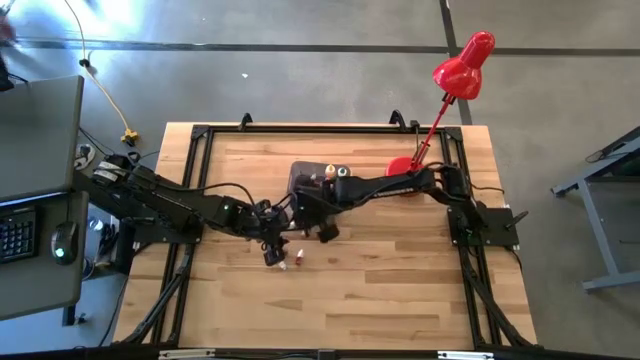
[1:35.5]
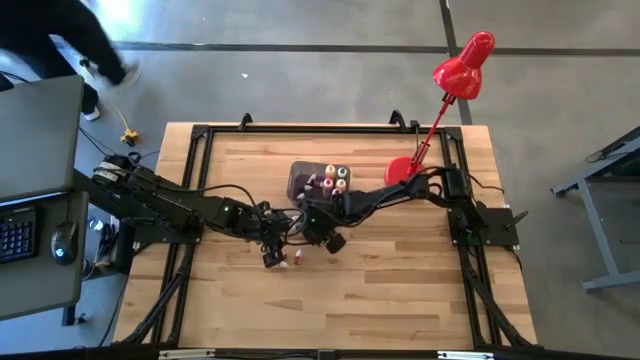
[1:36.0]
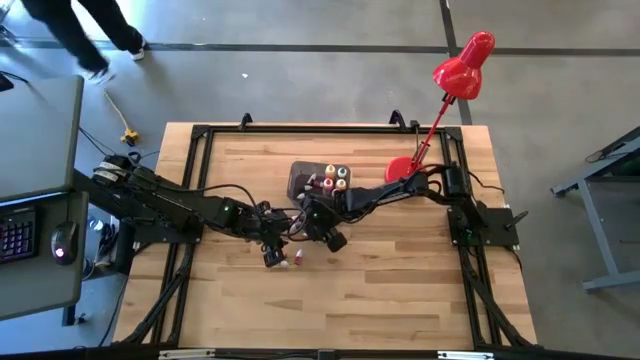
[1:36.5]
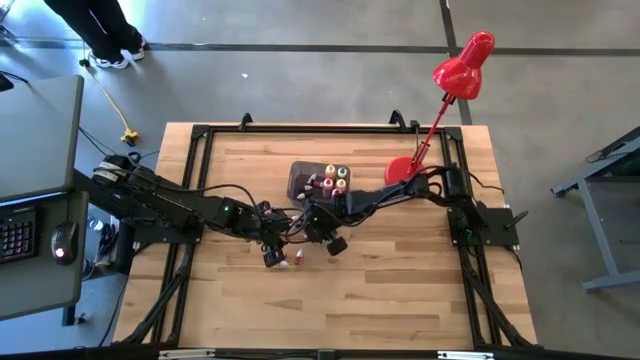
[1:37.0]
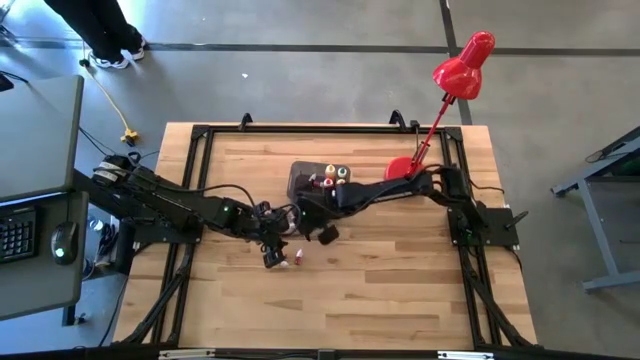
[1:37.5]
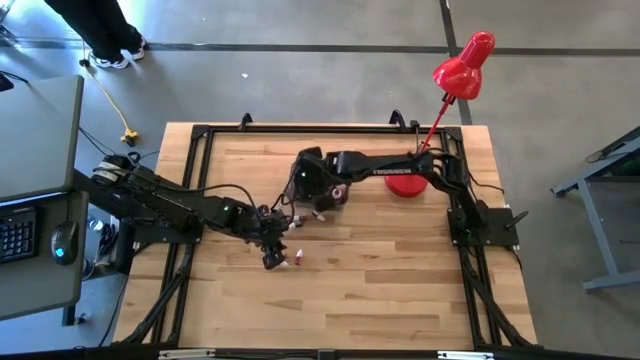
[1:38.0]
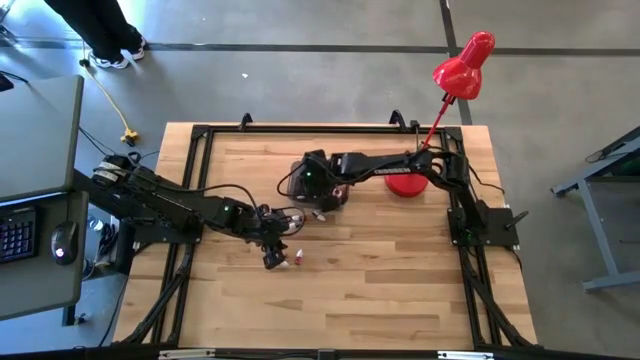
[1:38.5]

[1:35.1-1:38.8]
Task: Pick & Place food coloring
Put the small green food coloring bottle into the black bin

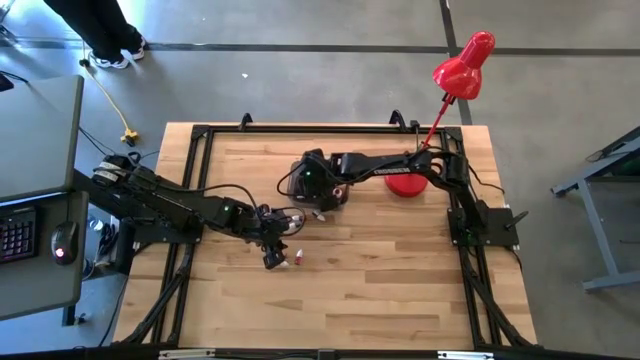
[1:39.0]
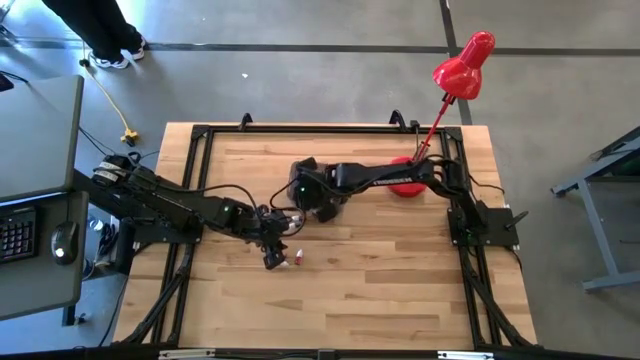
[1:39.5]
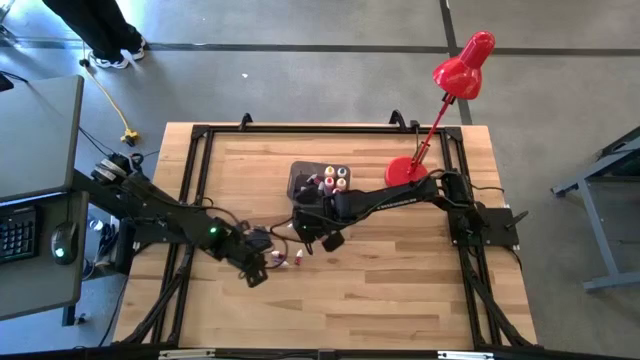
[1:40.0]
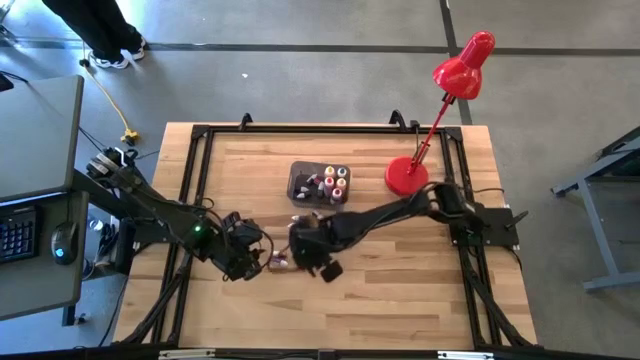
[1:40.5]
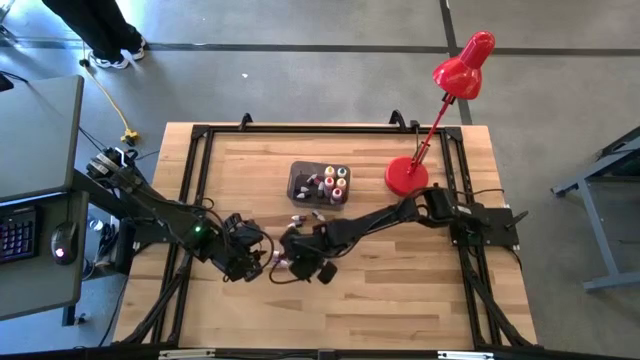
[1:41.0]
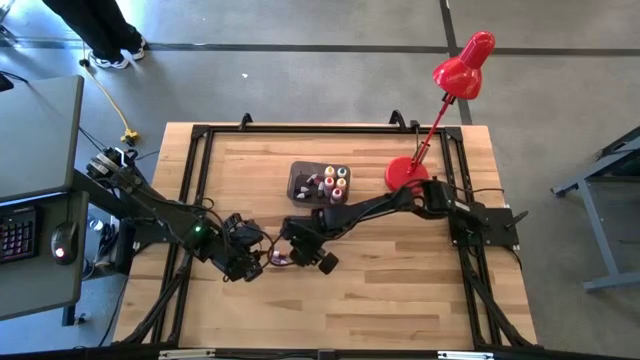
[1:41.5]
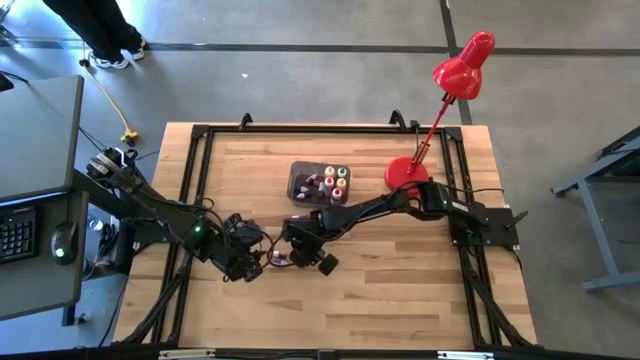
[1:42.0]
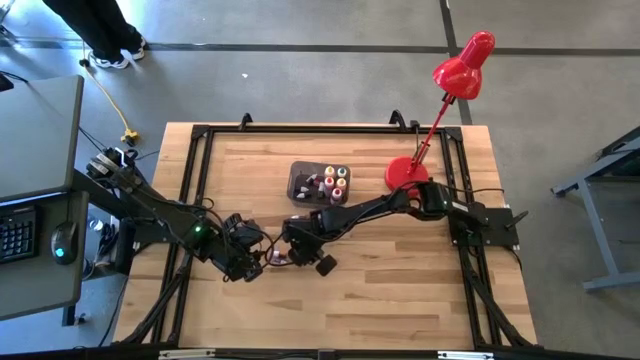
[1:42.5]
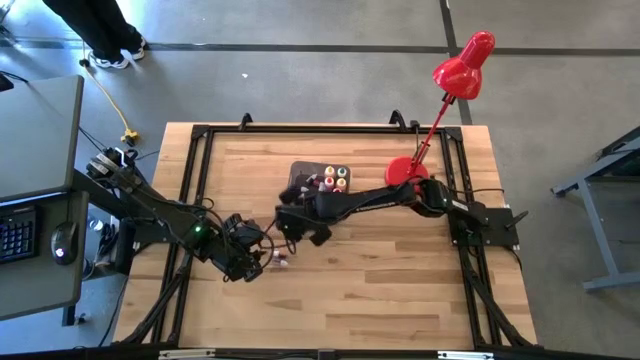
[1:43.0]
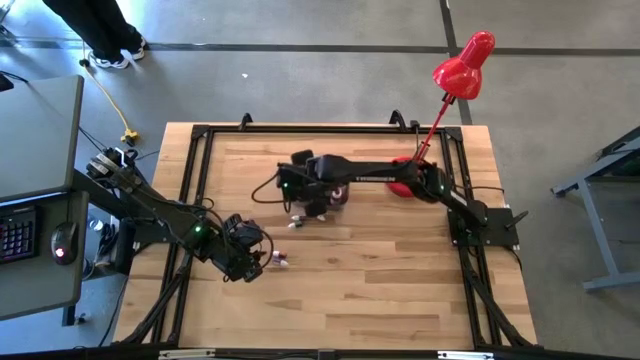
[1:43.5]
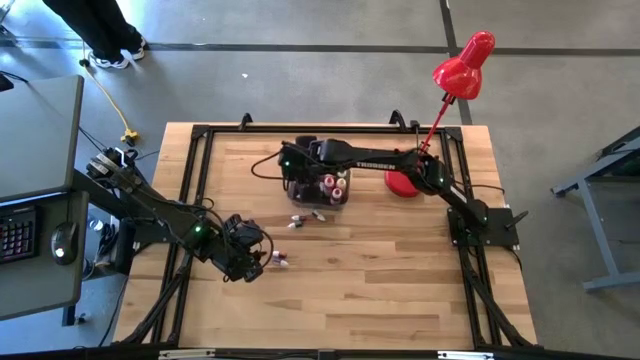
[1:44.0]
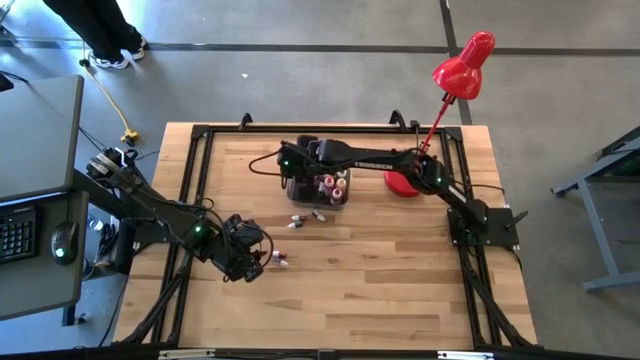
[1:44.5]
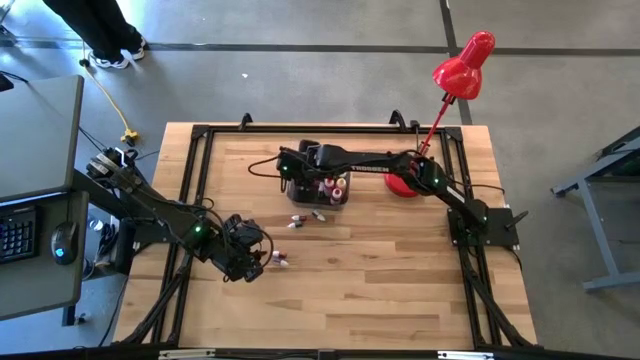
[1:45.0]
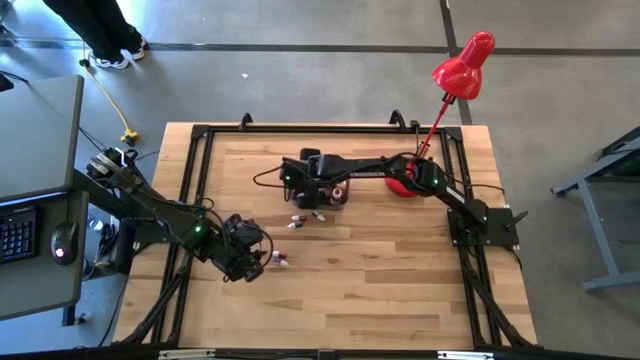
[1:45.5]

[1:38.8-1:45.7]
Put the small red food coloring bottle into the black bin

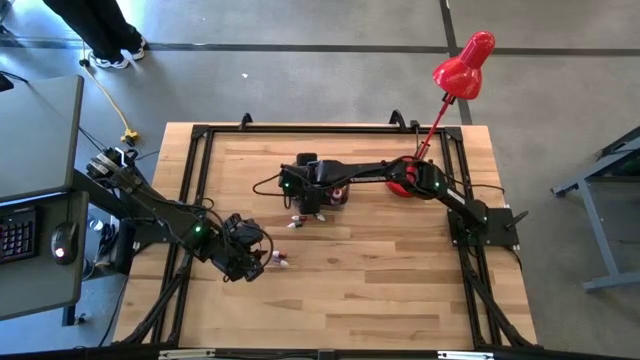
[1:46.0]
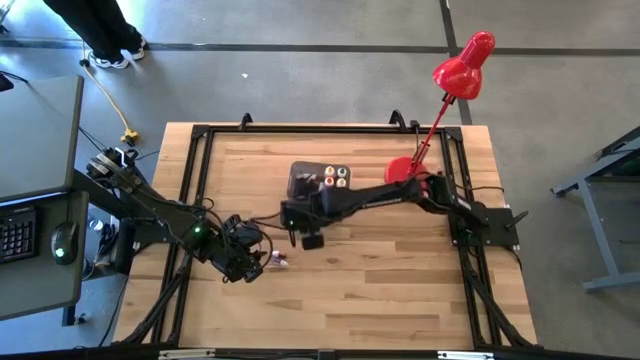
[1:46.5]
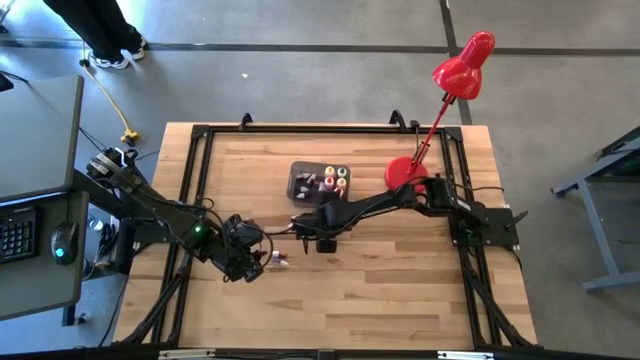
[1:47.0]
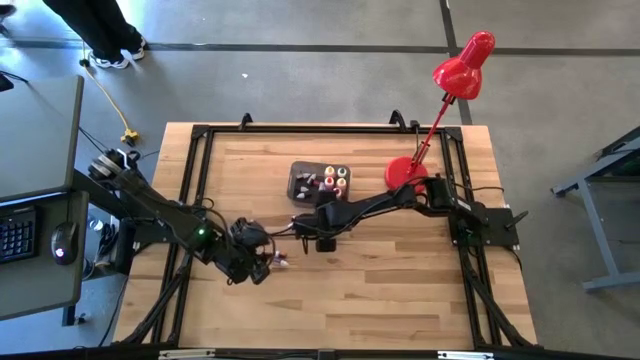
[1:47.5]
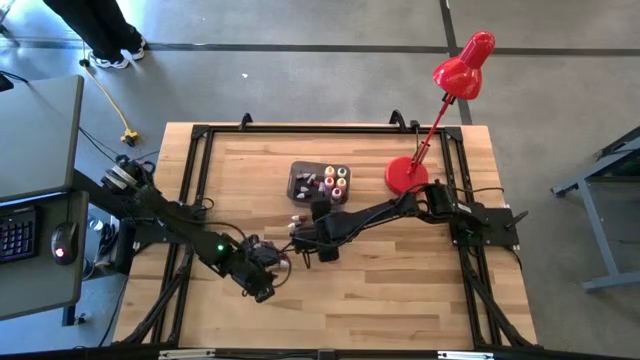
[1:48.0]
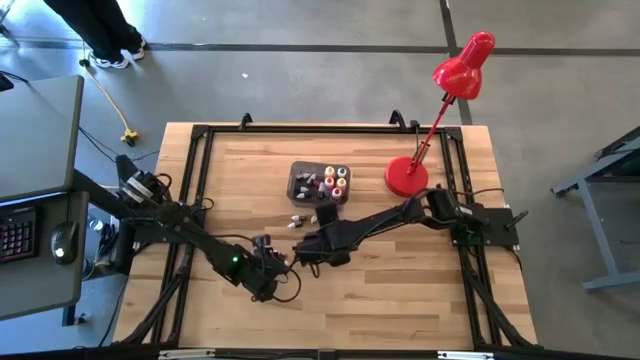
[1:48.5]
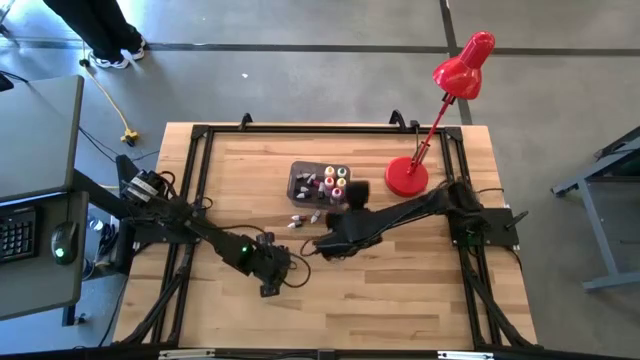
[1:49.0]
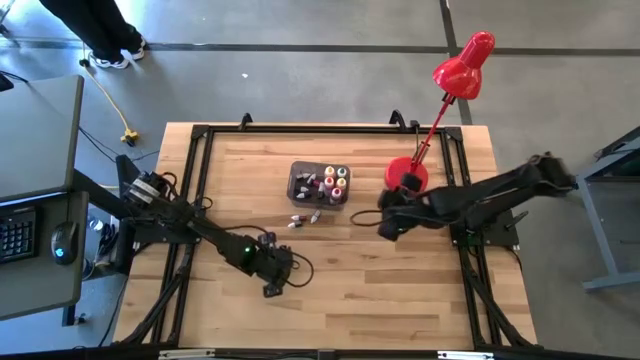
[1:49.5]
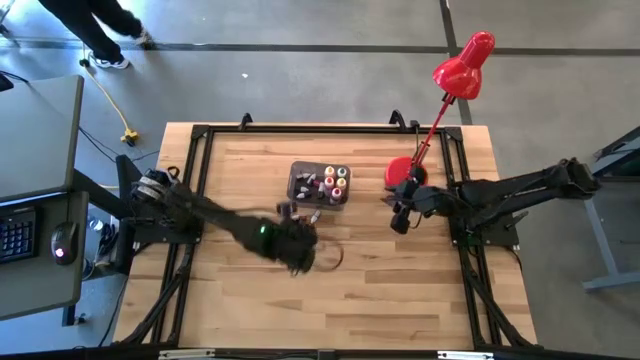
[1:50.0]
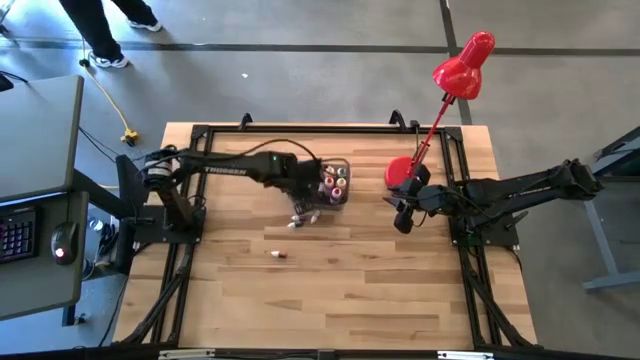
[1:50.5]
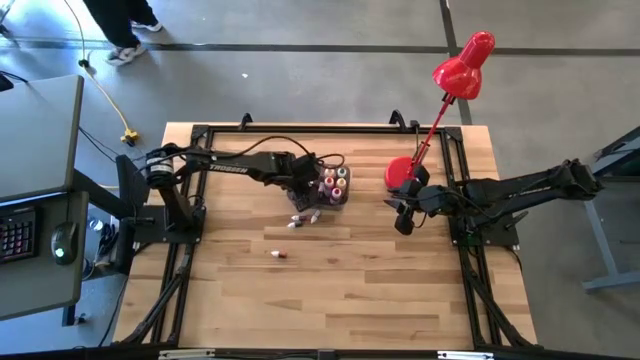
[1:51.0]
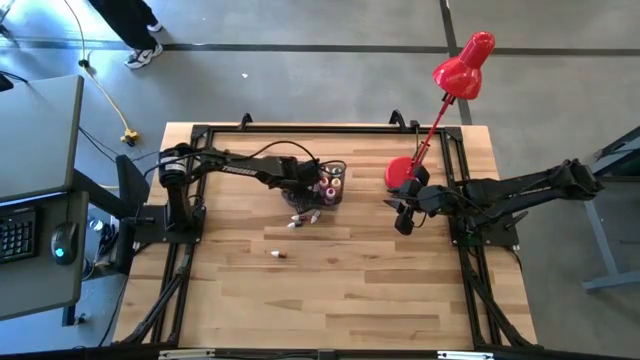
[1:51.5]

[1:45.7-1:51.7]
Put the small purple food coloring bottle into the black bin

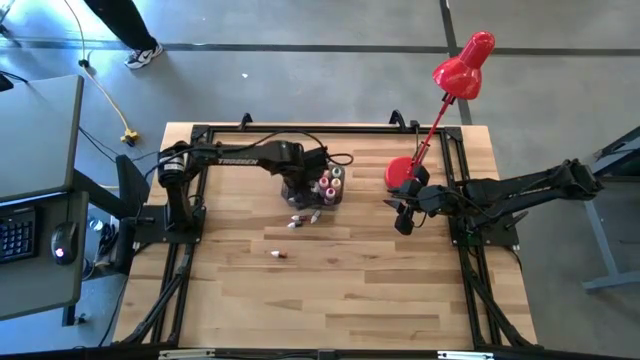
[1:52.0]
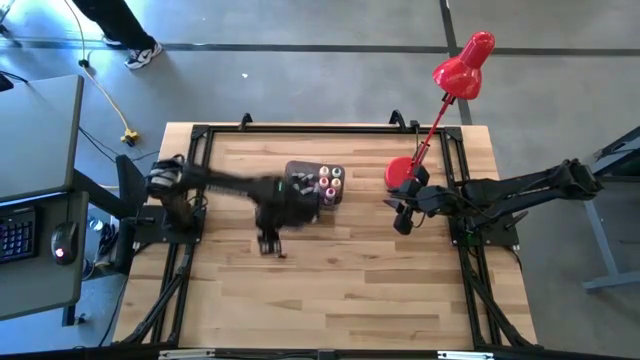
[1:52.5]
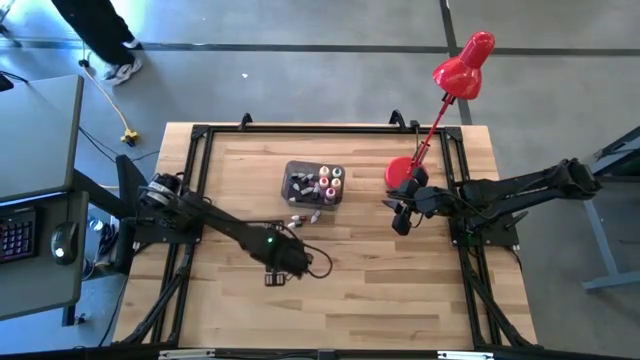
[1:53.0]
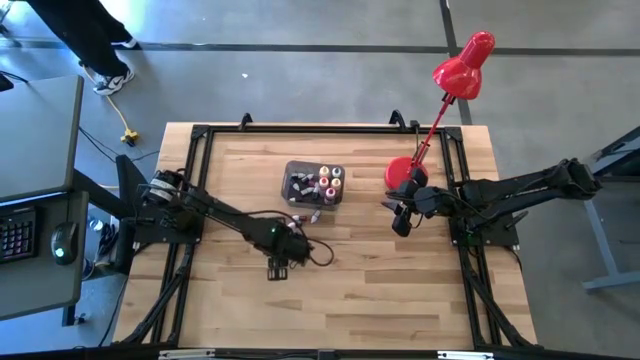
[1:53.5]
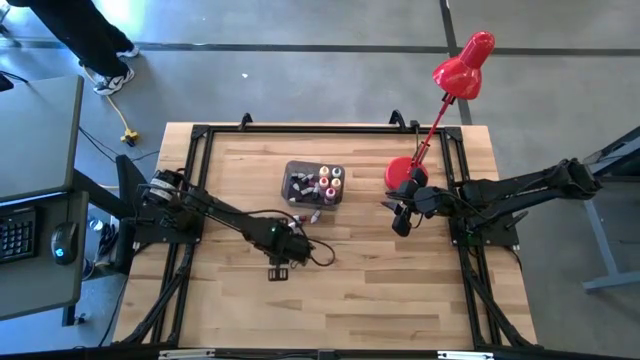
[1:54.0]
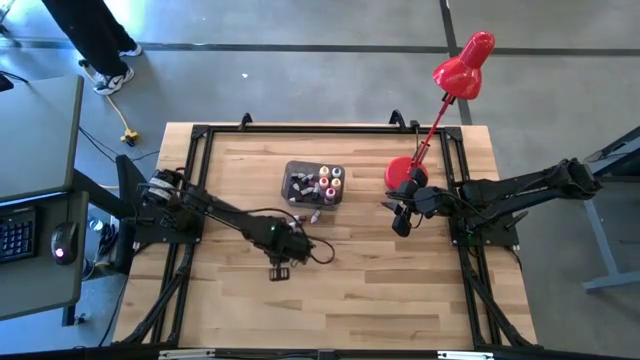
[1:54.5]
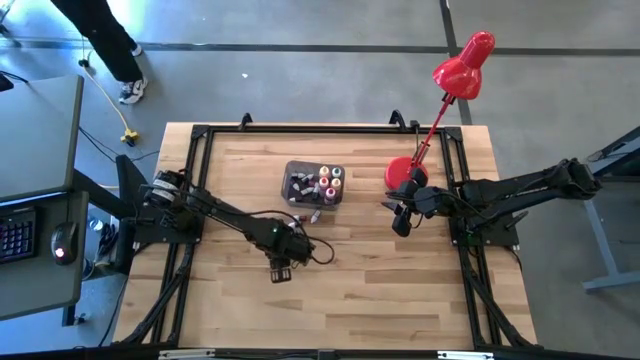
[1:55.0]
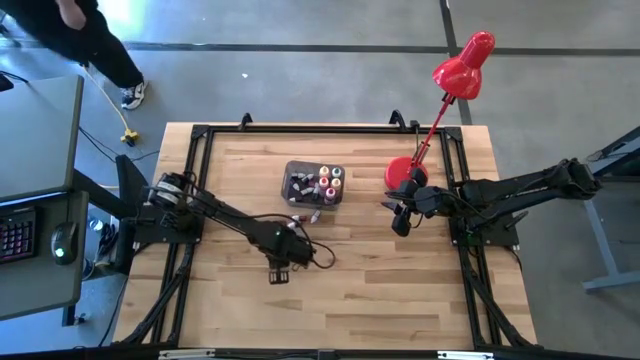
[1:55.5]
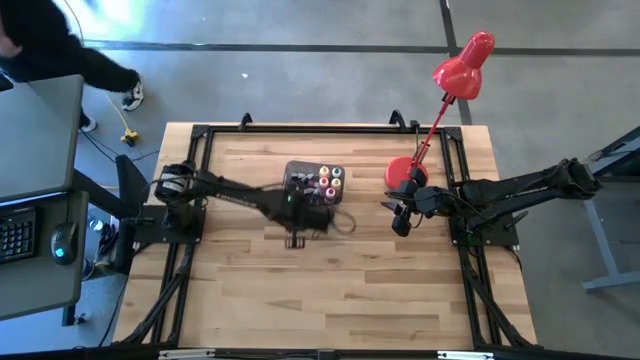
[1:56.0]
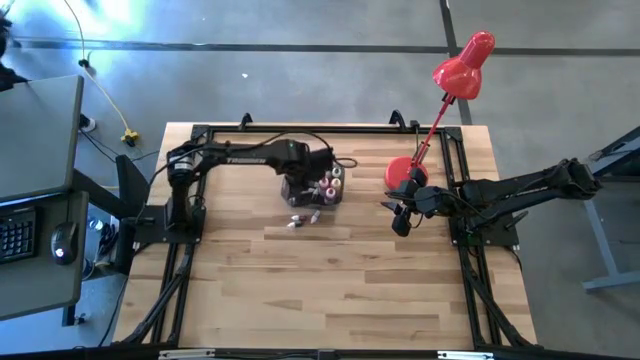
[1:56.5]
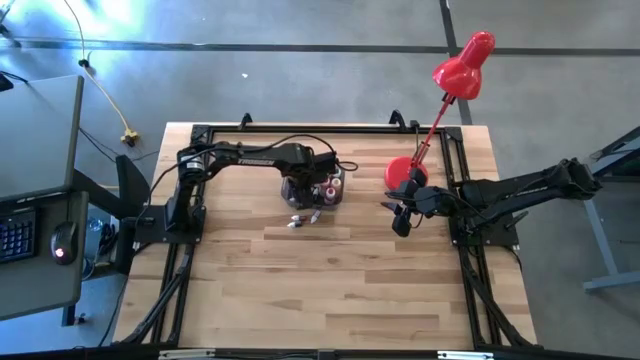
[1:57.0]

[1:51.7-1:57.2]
Put the small orange food coloring bottle into the black bin
